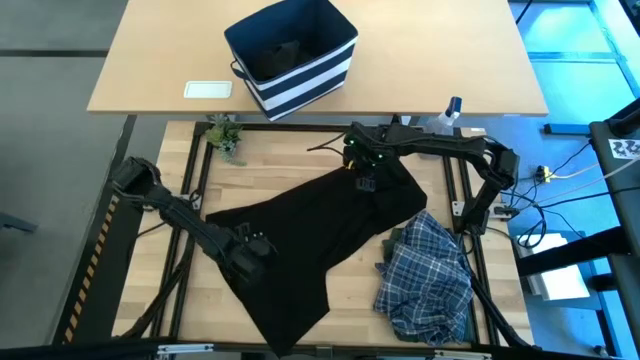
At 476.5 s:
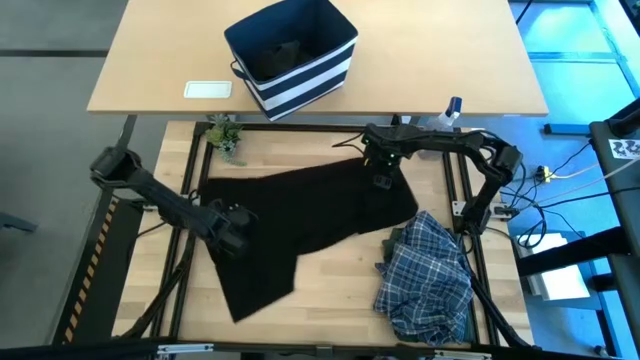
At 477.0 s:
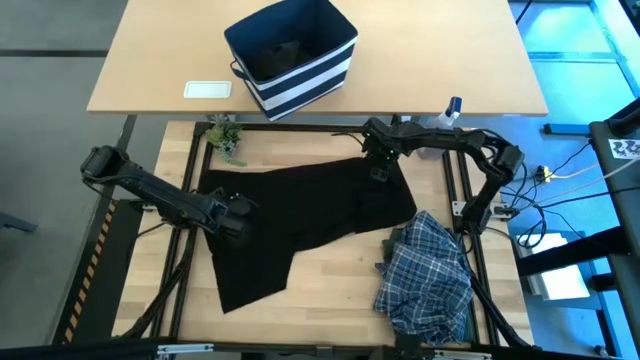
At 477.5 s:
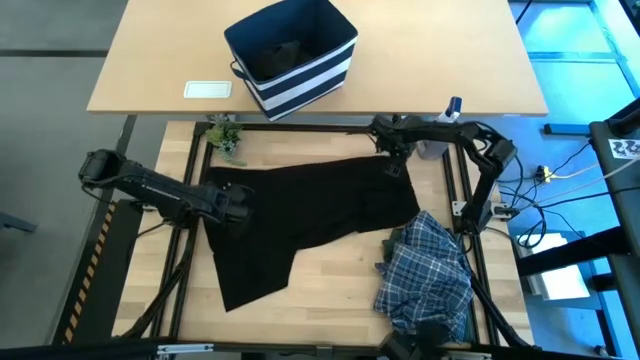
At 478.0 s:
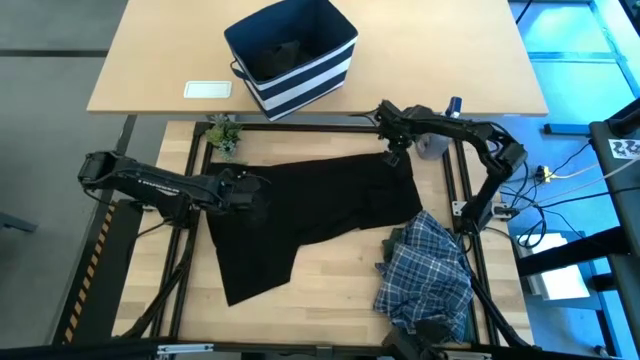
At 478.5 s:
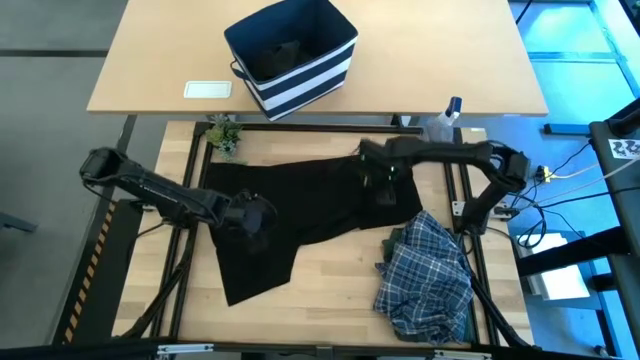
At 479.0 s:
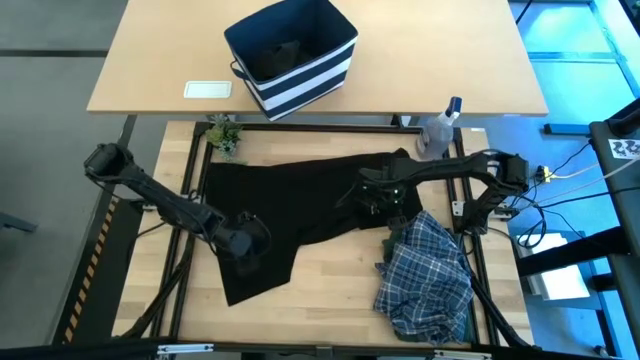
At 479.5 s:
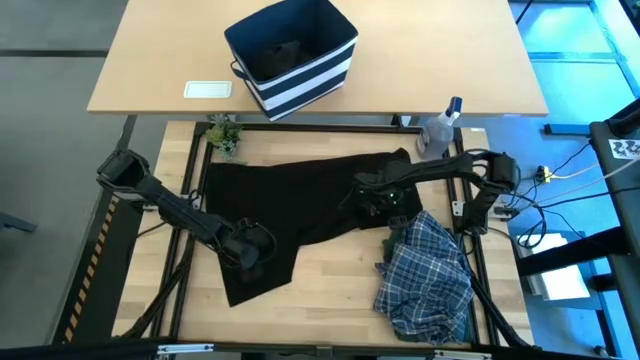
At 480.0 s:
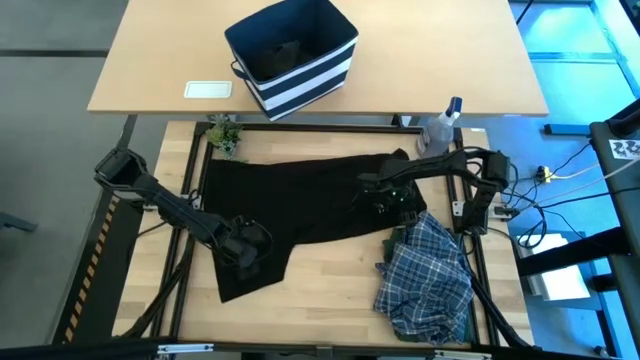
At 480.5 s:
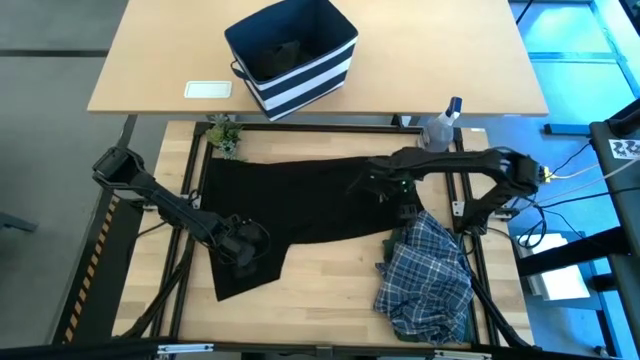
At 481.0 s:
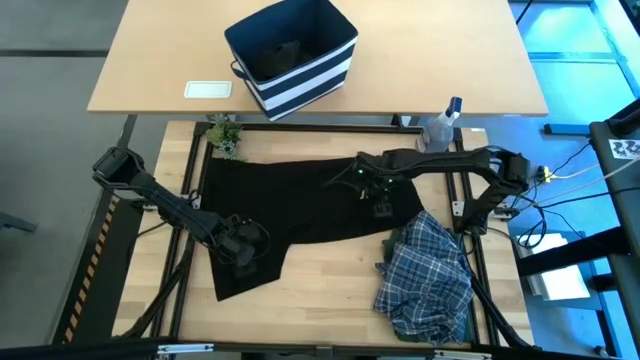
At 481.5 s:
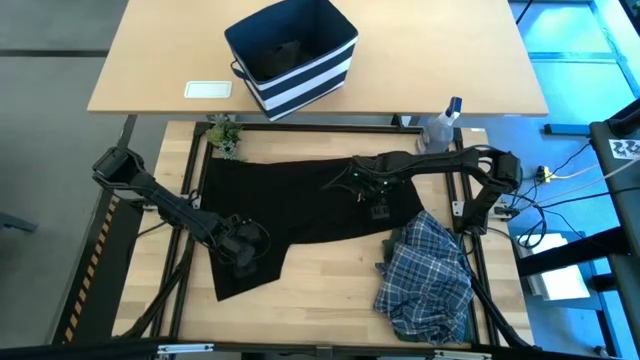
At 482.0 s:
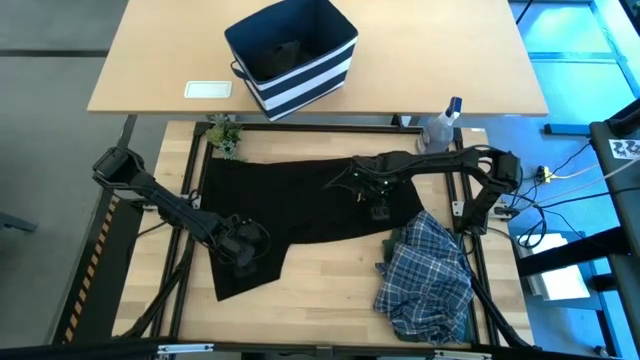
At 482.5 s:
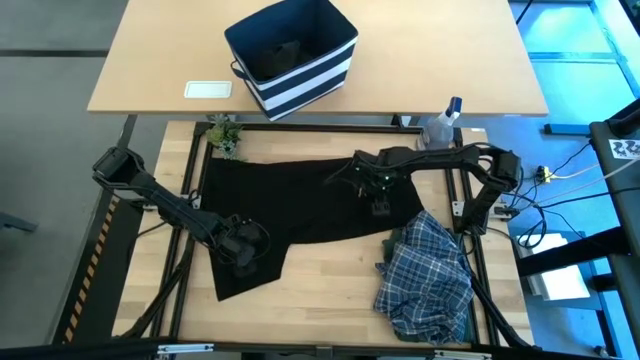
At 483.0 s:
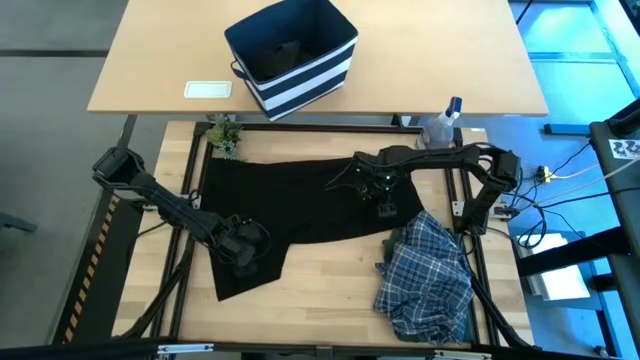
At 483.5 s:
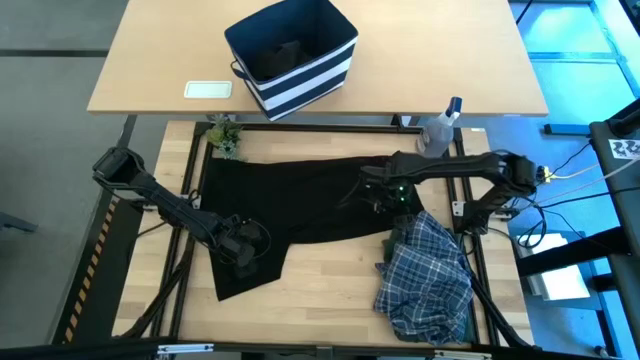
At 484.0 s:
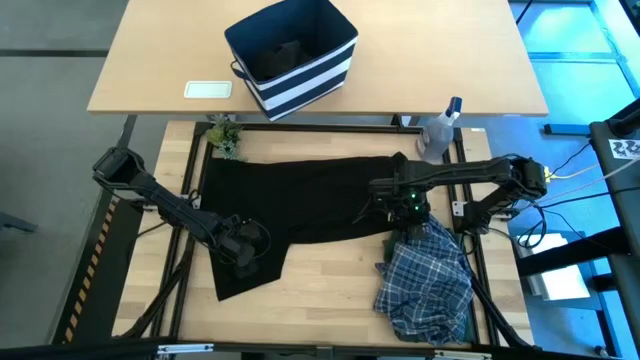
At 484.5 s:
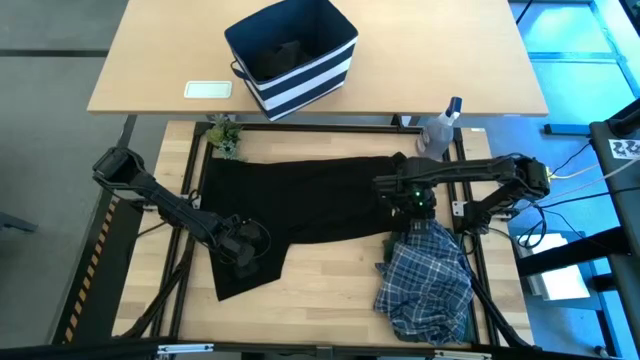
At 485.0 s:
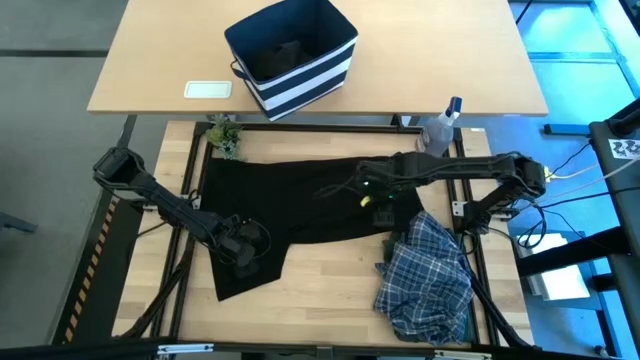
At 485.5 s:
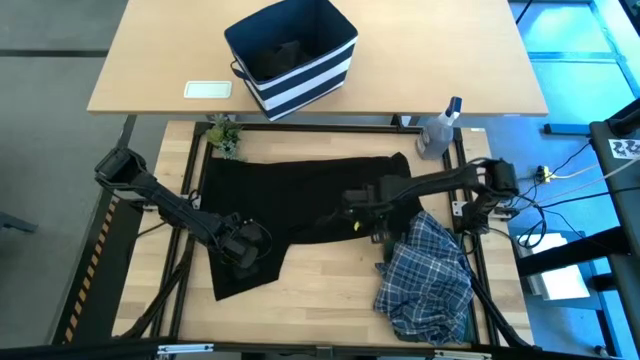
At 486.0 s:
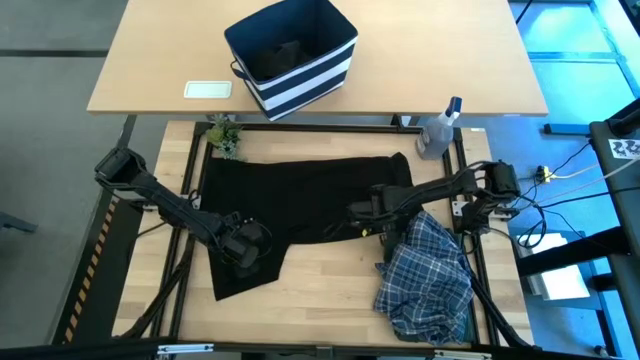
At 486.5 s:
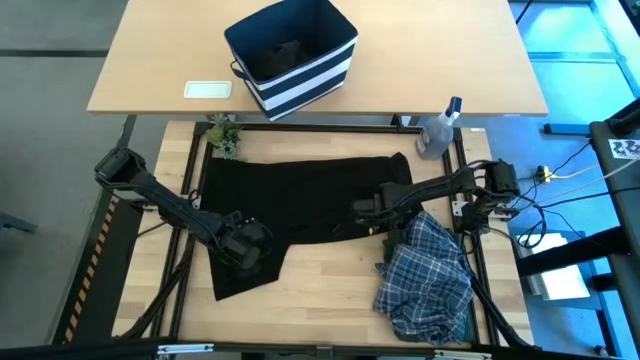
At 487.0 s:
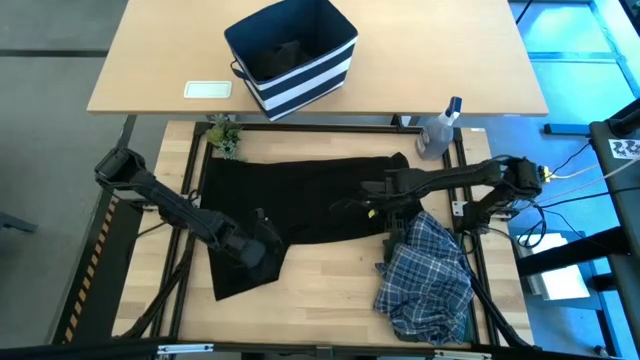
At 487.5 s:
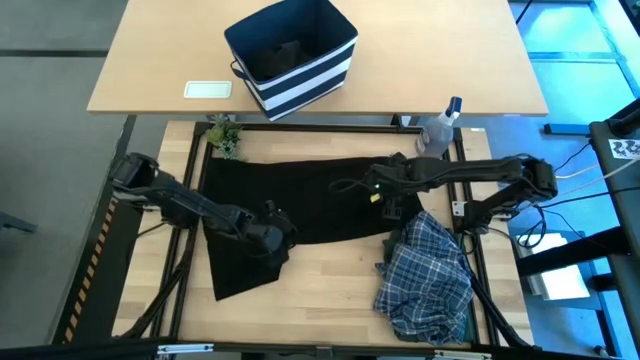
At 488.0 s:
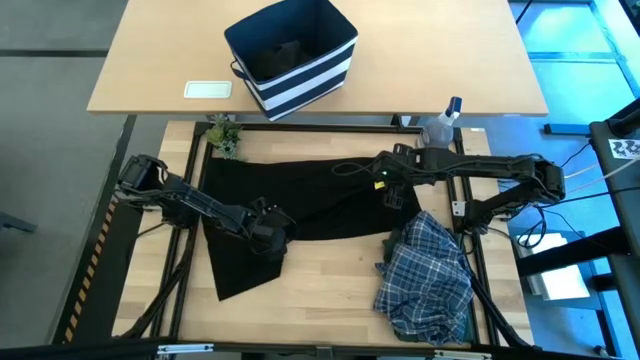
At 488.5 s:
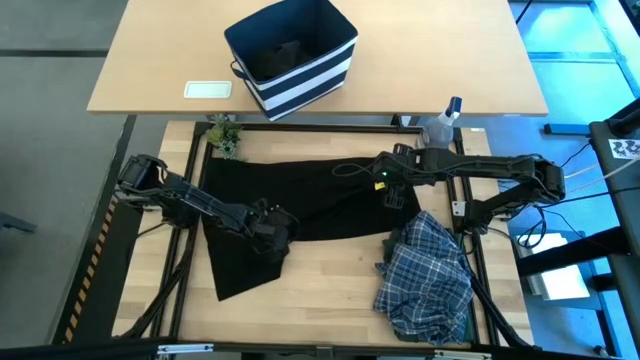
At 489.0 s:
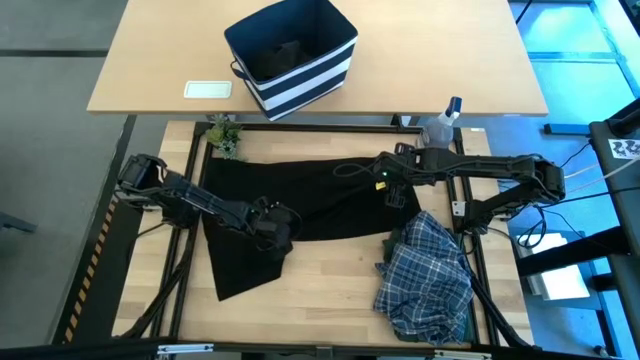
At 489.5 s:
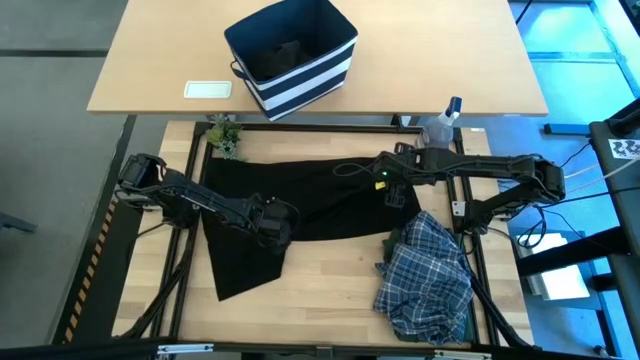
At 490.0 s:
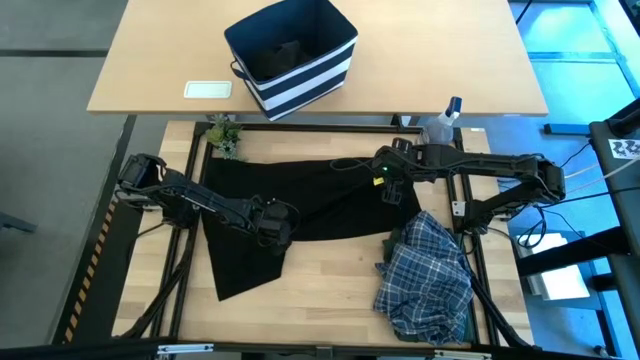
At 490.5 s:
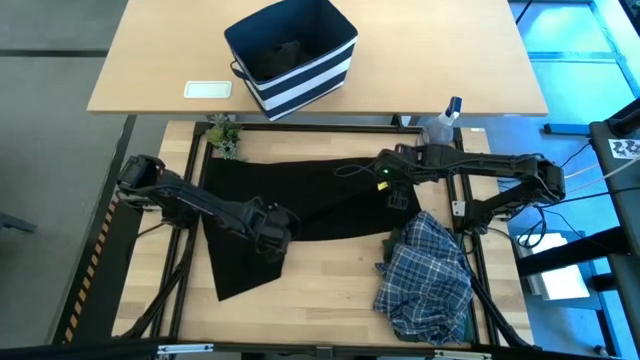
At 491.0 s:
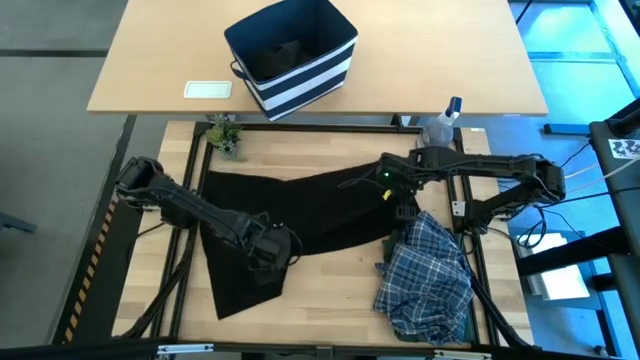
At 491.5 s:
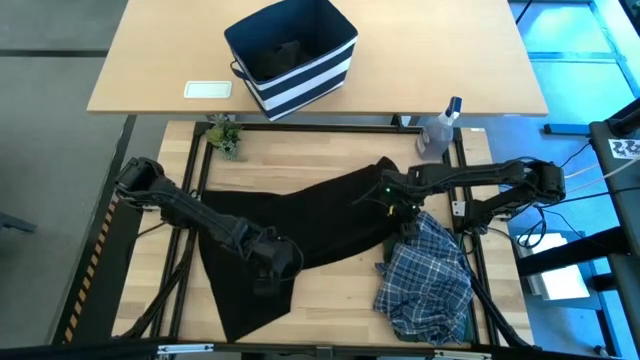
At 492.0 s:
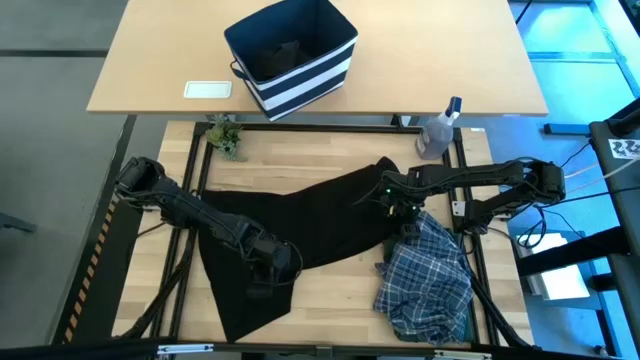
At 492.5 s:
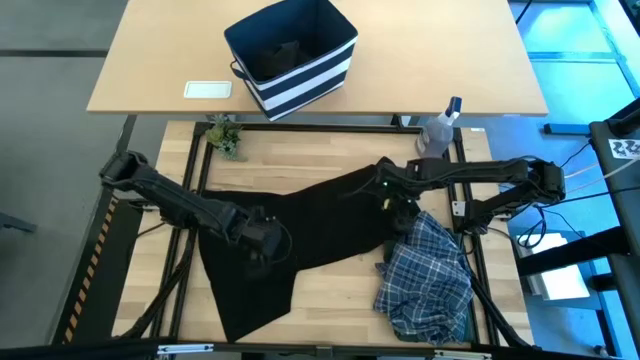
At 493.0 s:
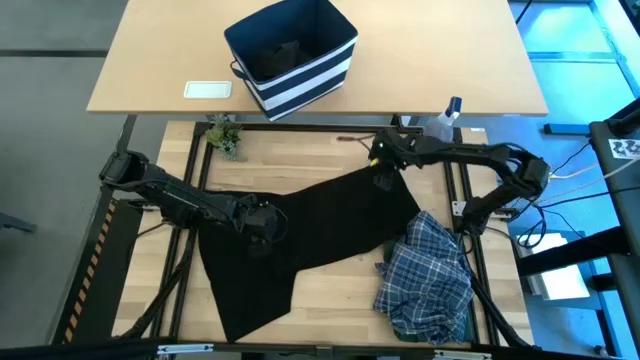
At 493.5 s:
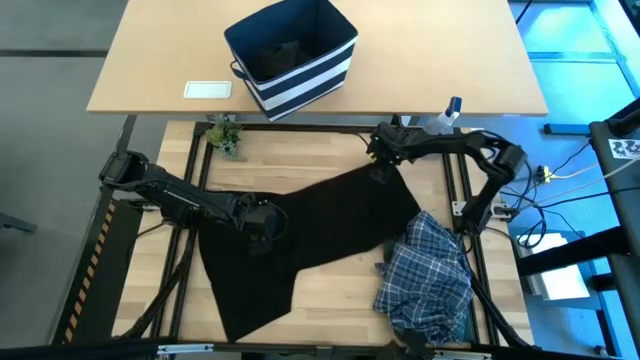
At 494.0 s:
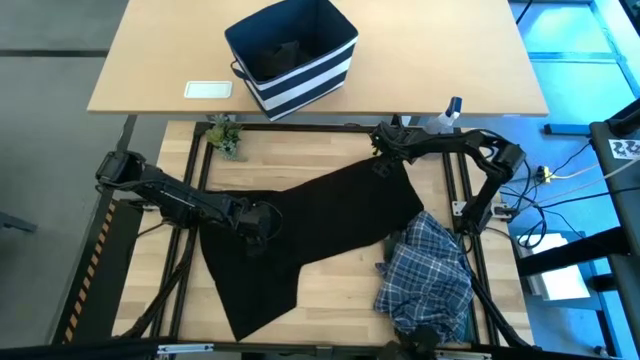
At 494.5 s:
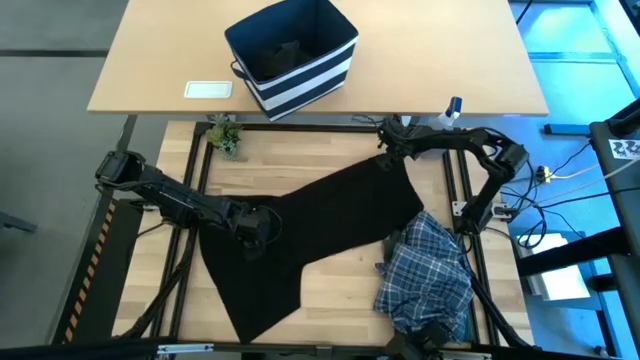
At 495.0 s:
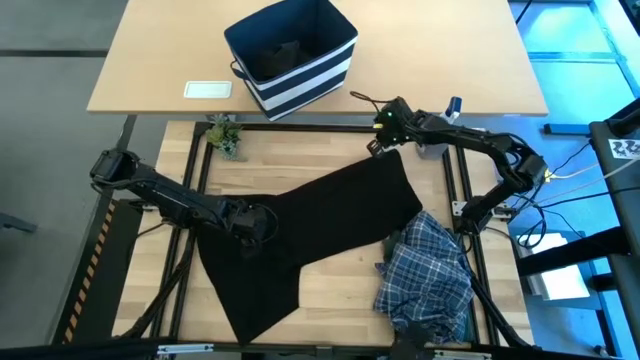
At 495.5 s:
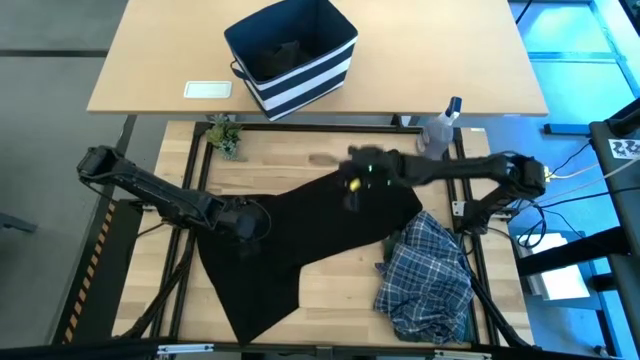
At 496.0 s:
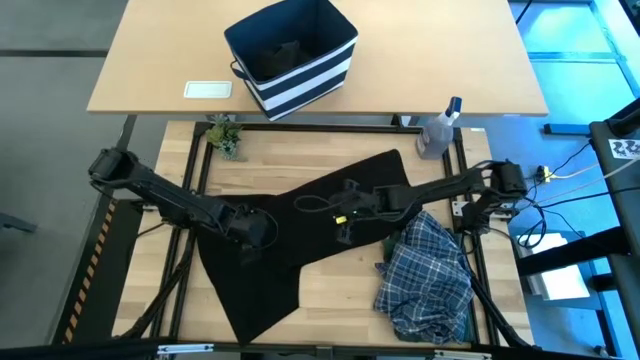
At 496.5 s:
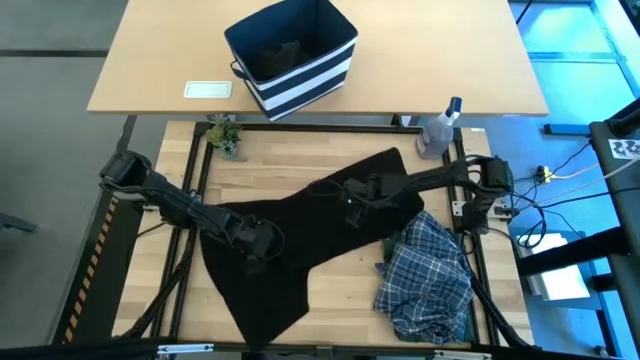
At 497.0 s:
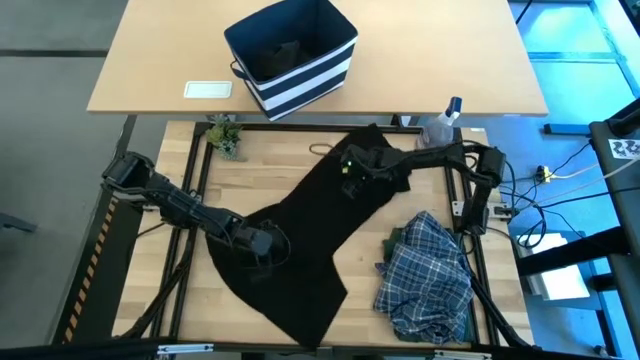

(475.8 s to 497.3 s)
Task: Fold Laundry from Bin
Fold the black shirt
